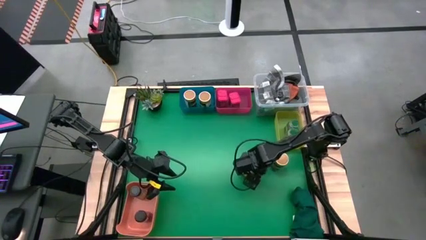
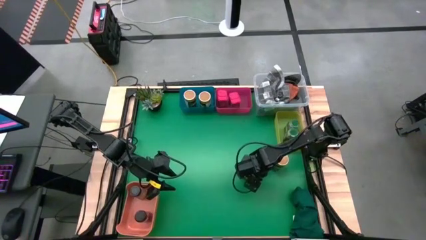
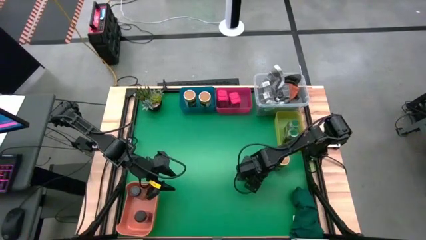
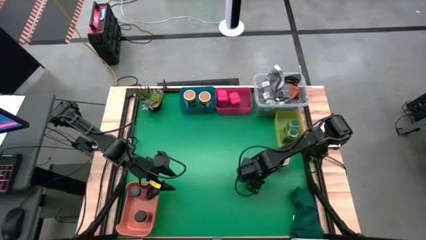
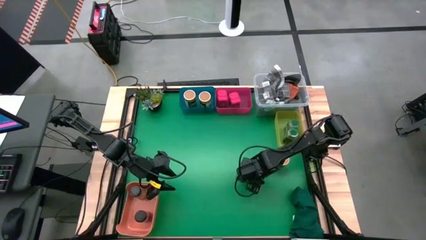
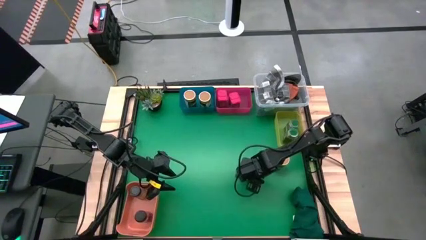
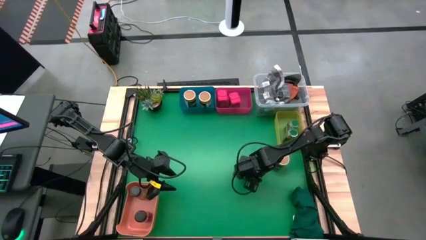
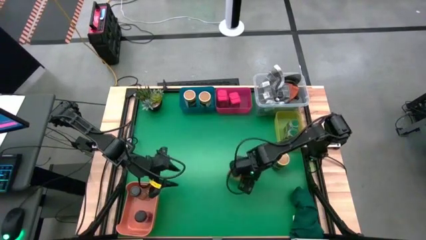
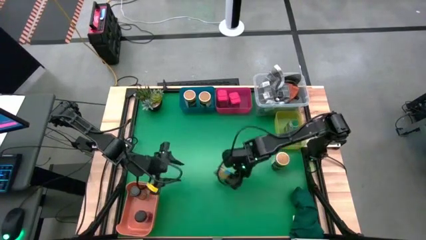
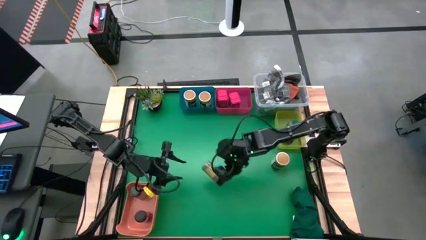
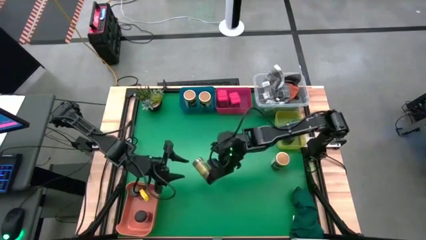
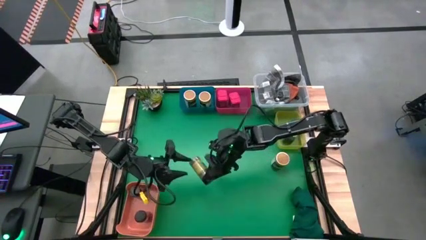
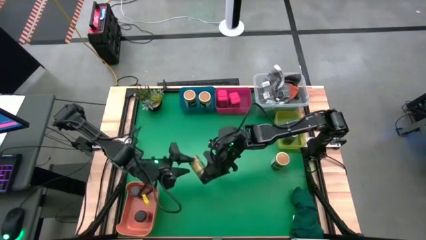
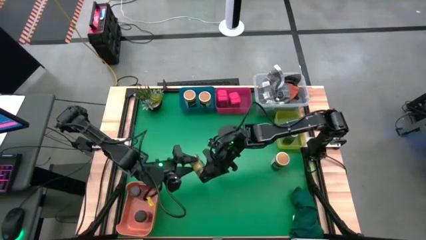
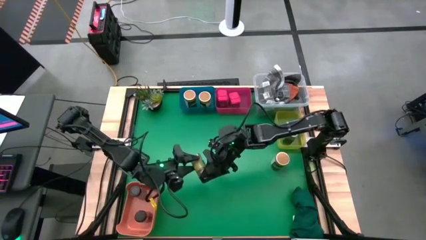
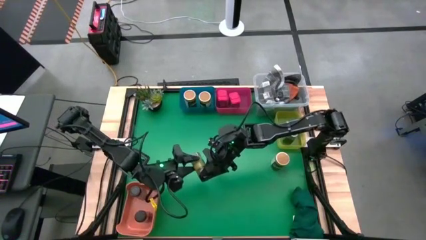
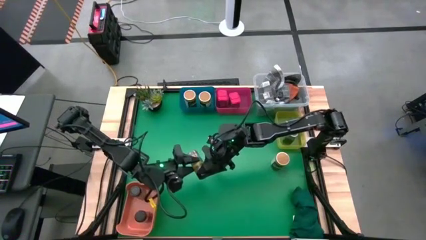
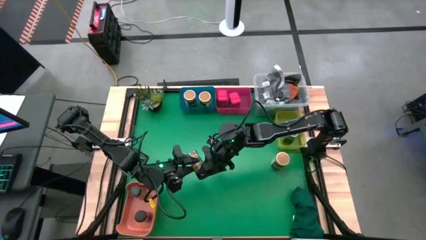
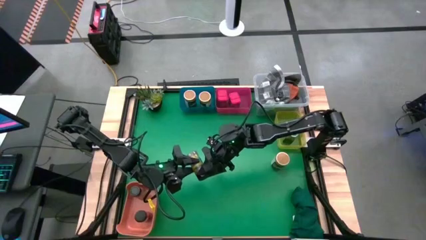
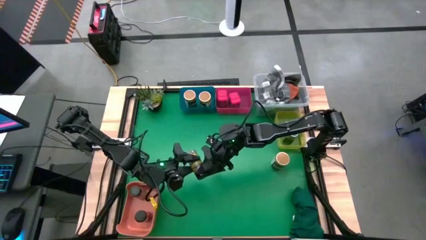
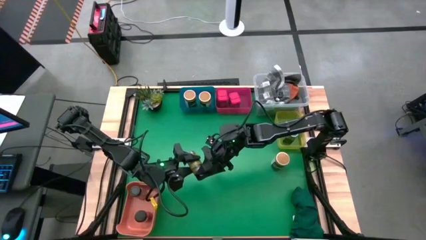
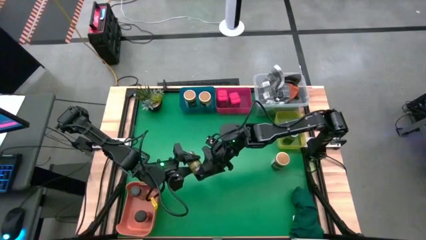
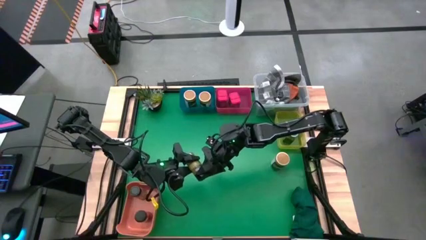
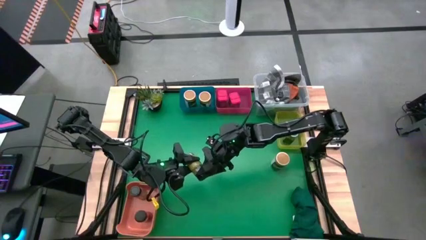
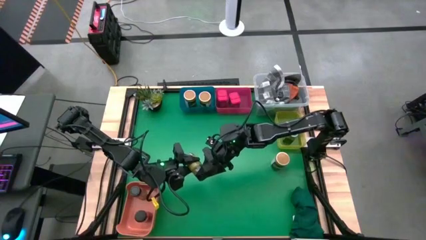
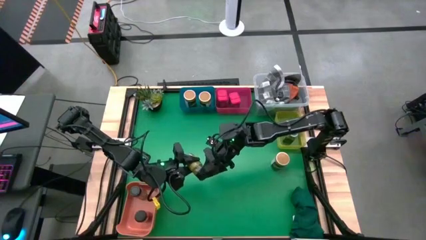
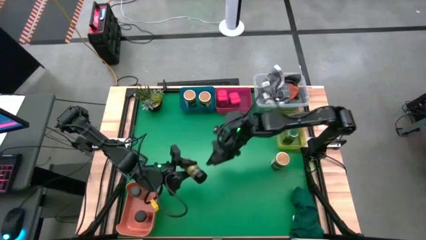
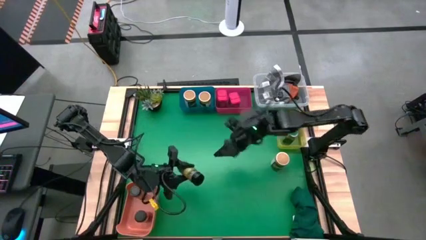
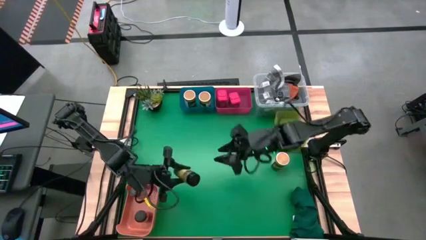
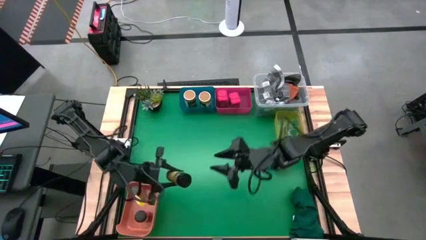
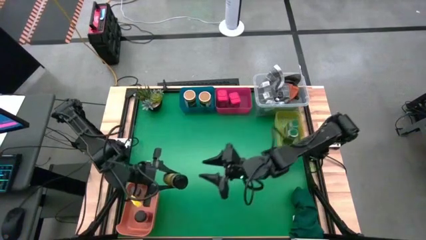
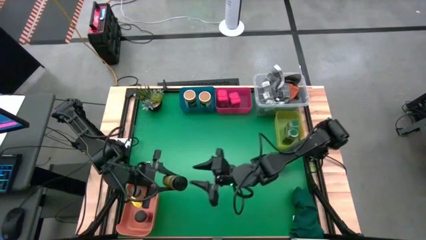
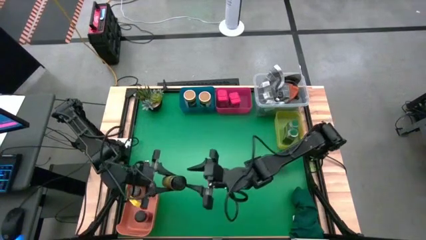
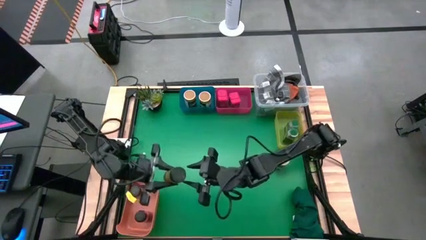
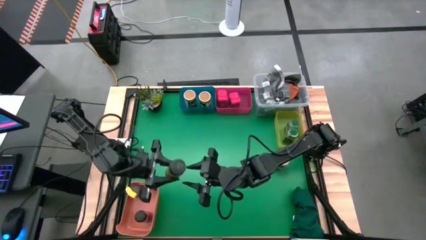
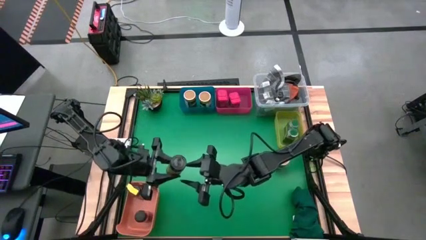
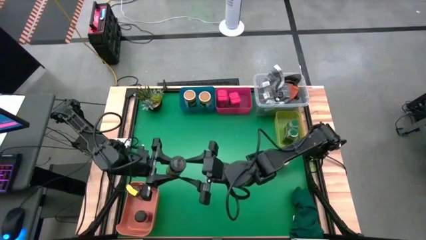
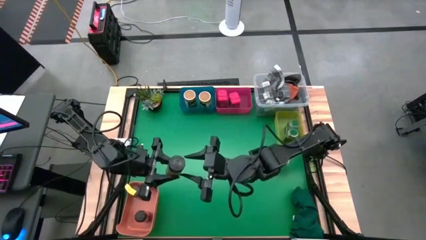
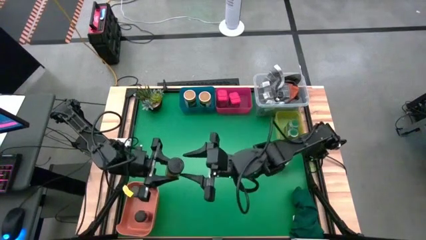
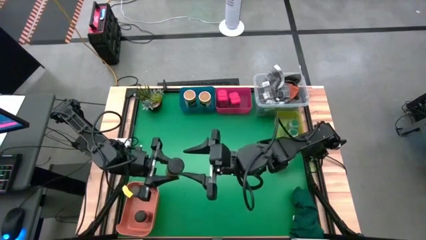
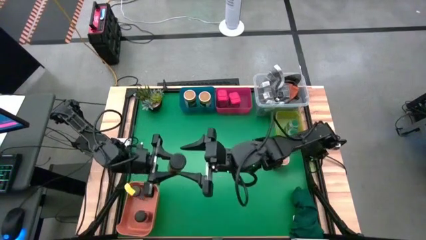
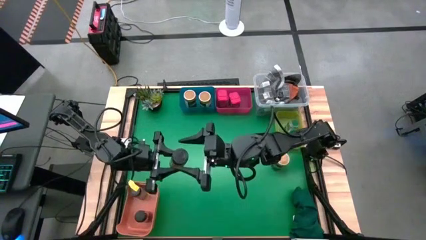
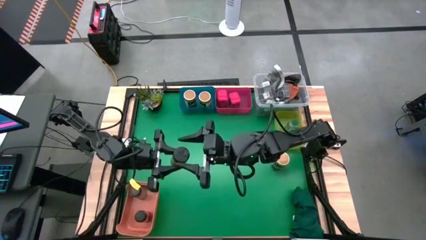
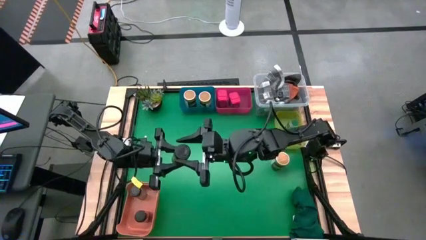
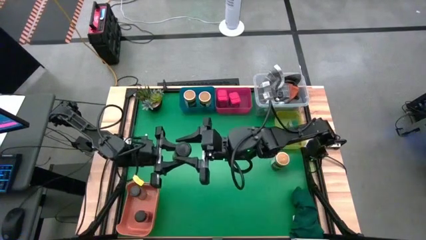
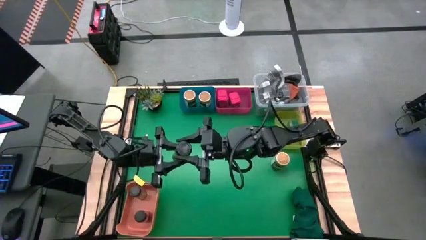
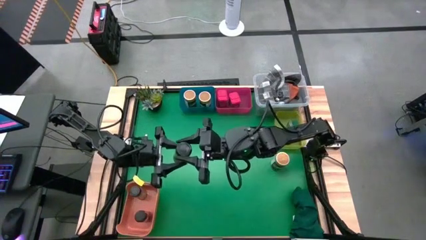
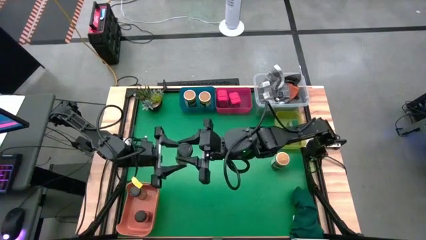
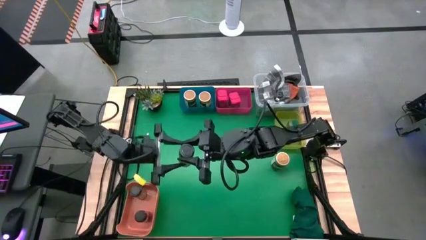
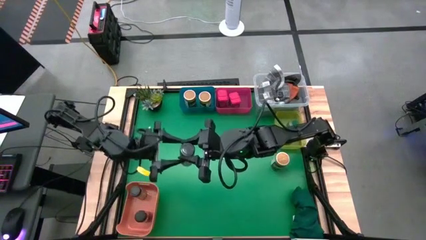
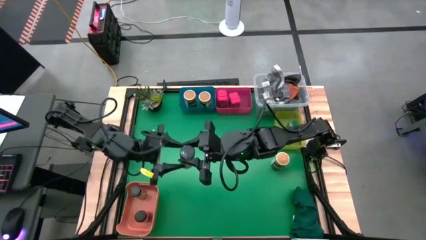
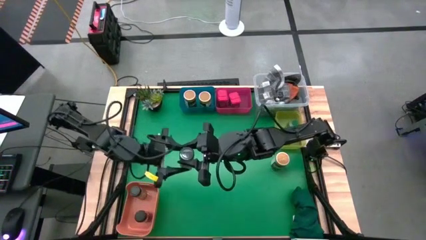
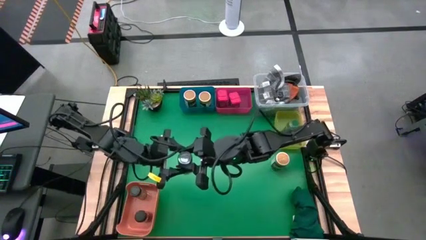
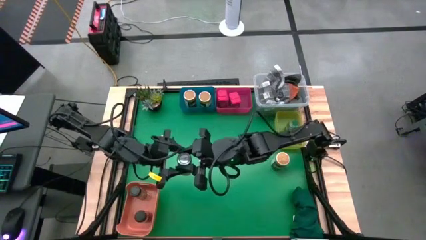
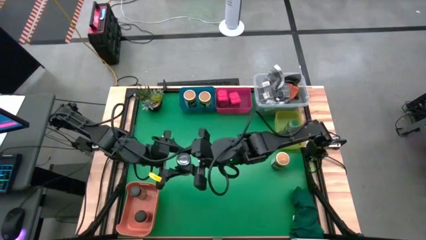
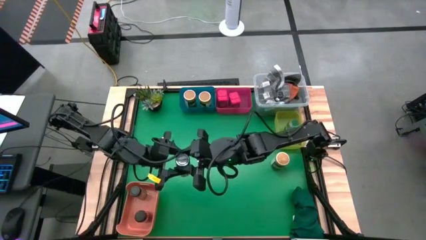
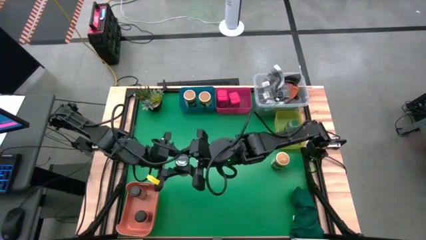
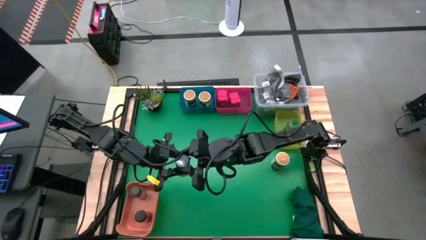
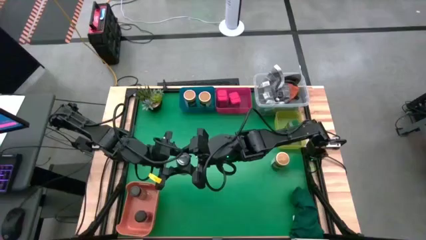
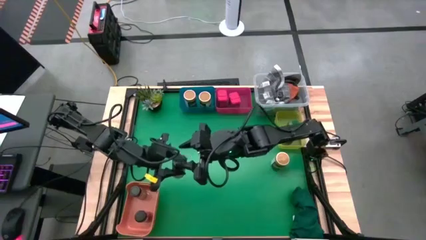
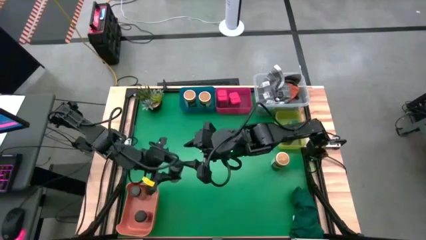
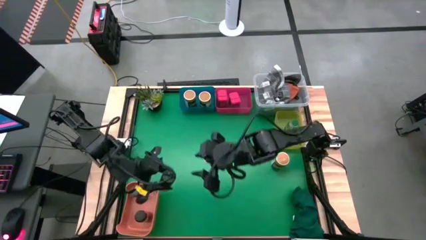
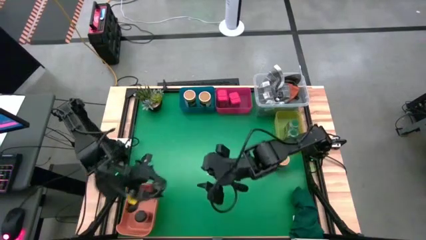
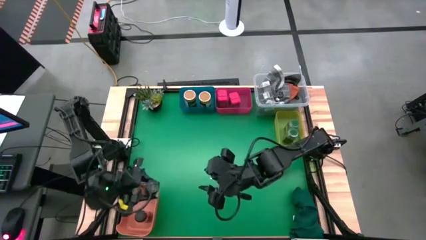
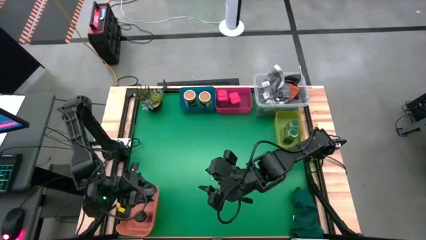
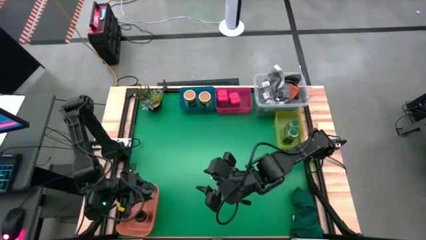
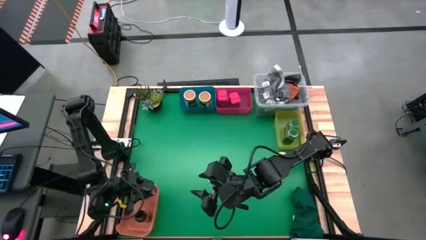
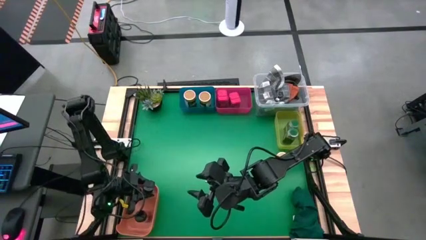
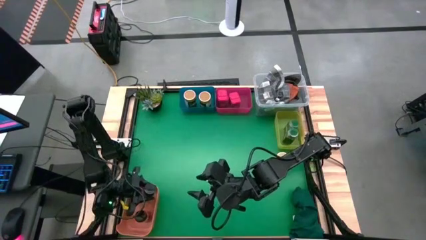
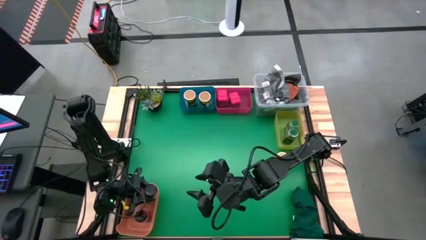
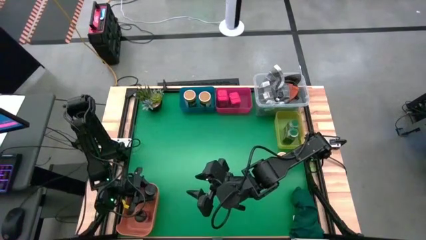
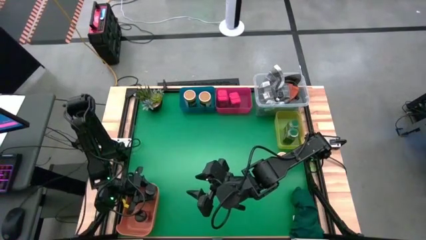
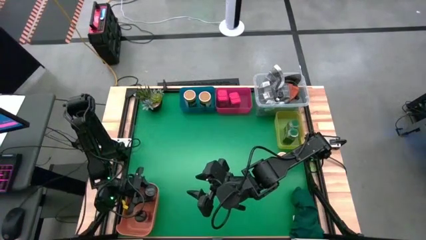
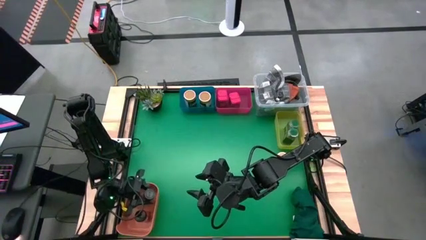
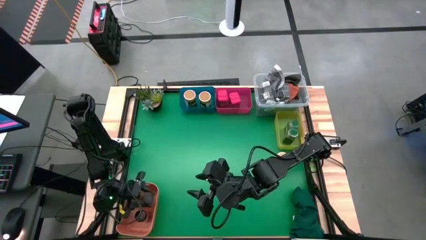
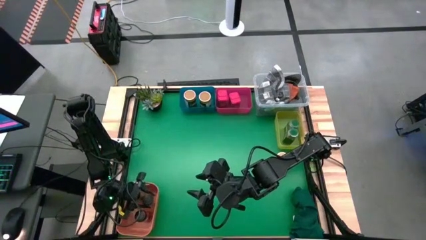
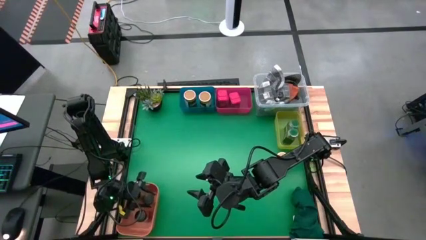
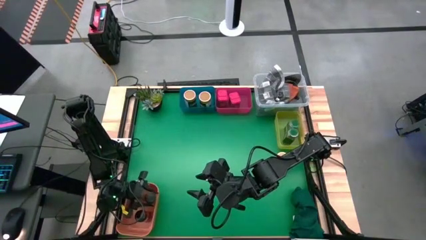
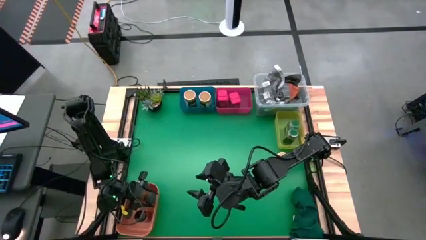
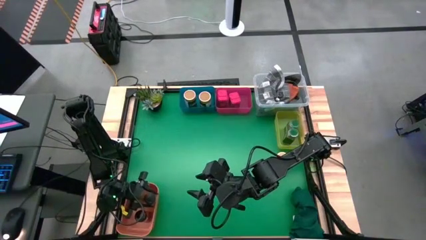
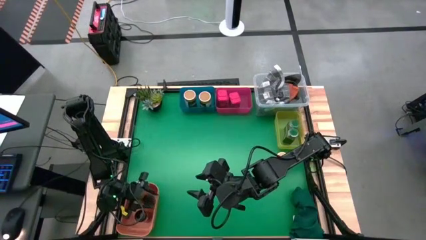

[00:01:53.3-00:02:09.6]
Task: Sort spices by type
Put the black spice bottle into the orange bin
